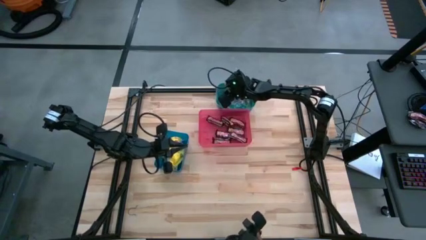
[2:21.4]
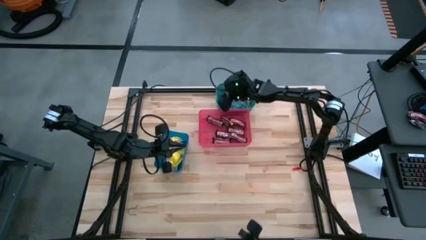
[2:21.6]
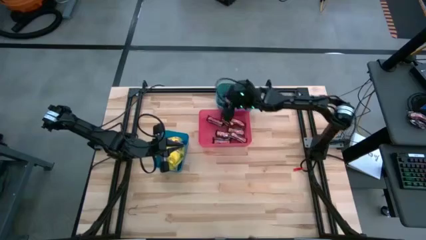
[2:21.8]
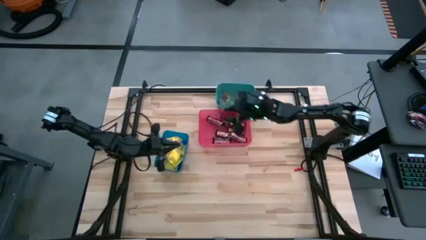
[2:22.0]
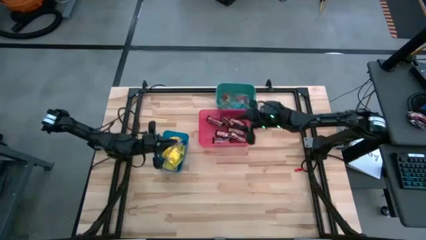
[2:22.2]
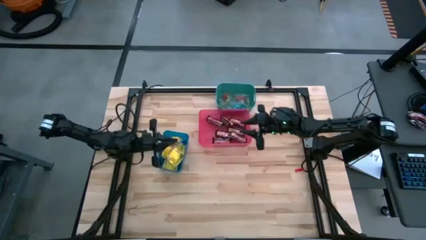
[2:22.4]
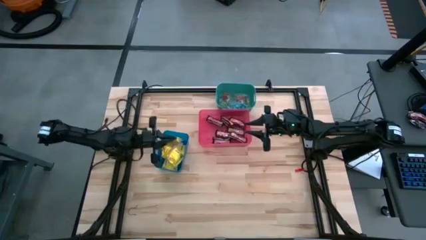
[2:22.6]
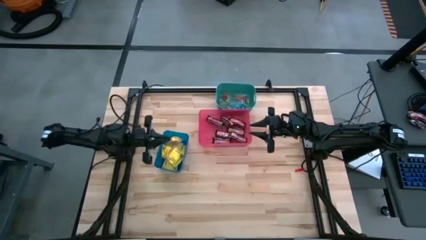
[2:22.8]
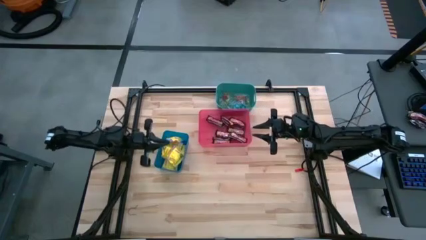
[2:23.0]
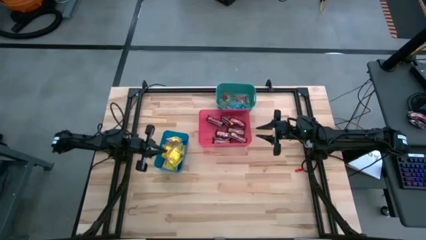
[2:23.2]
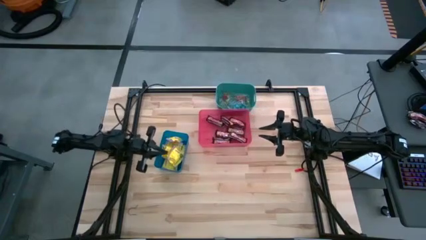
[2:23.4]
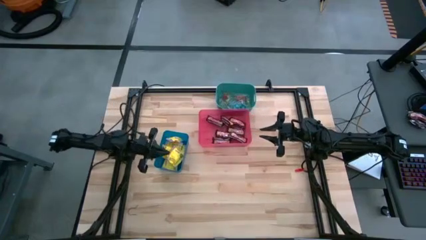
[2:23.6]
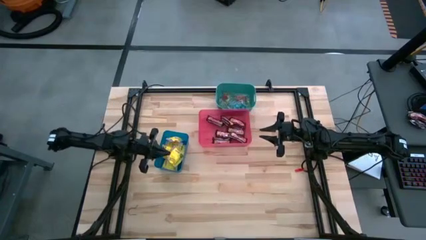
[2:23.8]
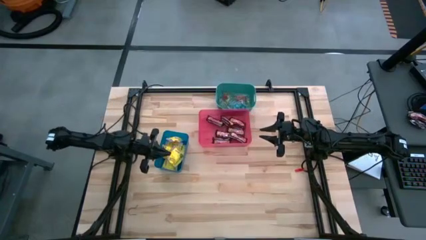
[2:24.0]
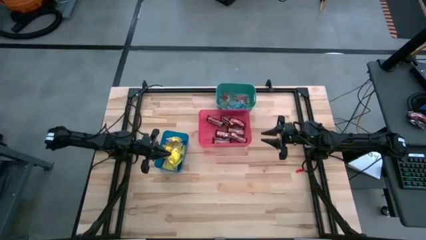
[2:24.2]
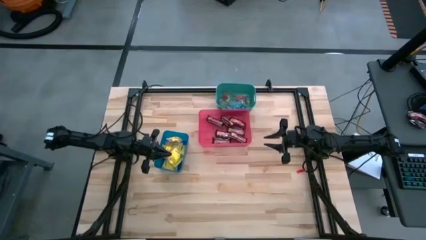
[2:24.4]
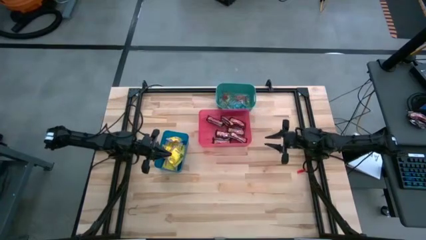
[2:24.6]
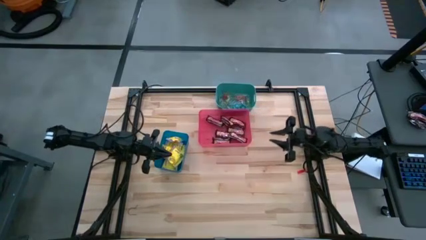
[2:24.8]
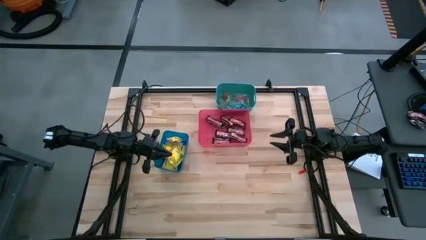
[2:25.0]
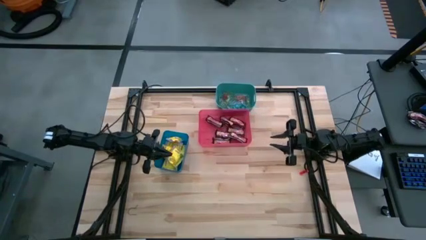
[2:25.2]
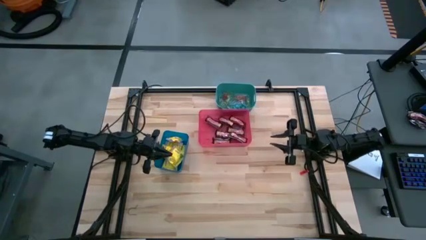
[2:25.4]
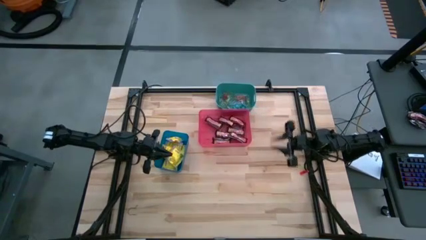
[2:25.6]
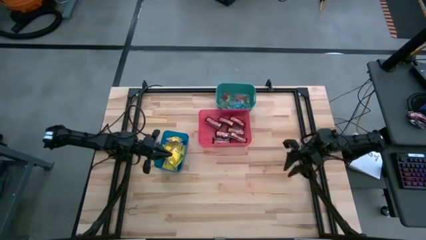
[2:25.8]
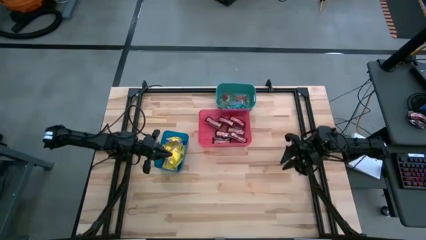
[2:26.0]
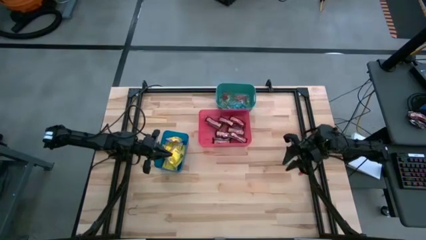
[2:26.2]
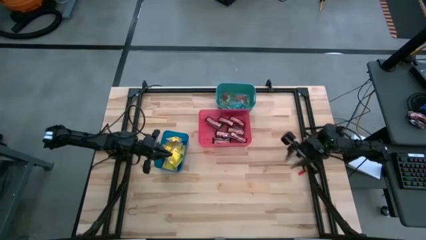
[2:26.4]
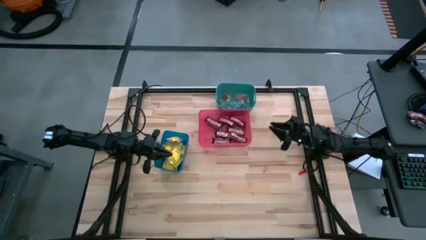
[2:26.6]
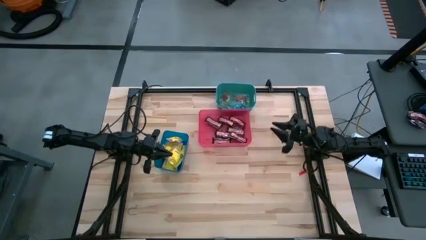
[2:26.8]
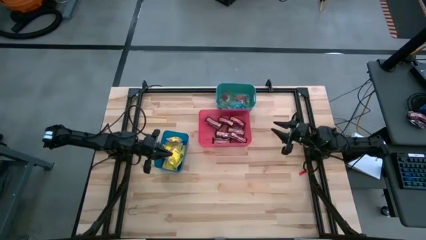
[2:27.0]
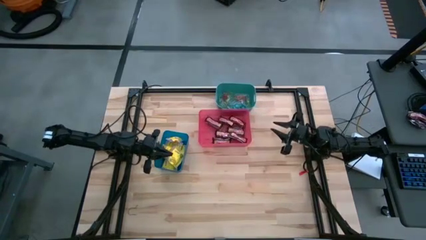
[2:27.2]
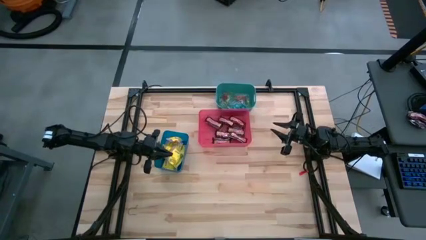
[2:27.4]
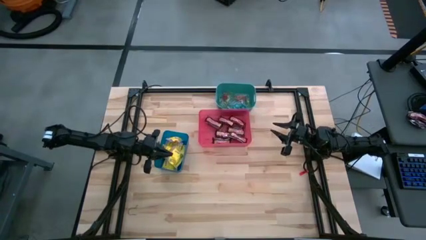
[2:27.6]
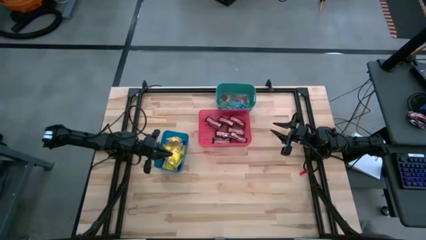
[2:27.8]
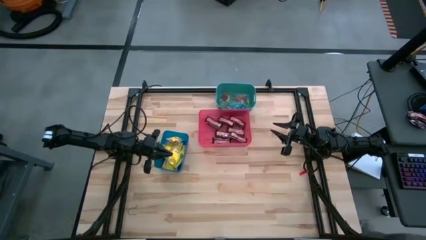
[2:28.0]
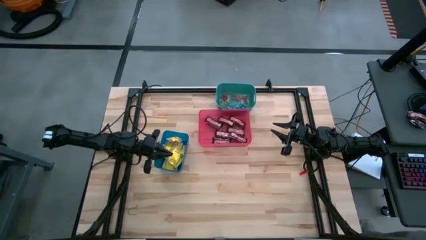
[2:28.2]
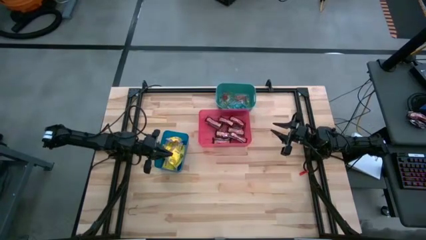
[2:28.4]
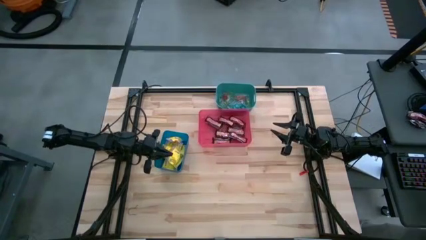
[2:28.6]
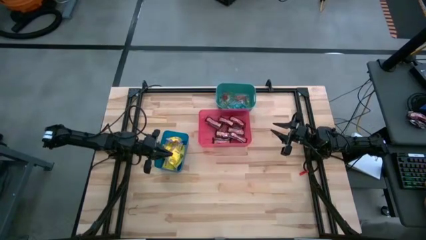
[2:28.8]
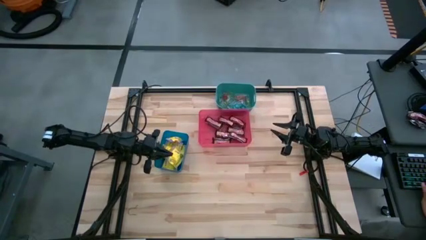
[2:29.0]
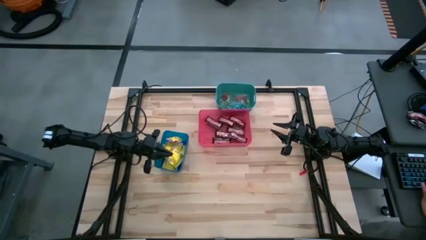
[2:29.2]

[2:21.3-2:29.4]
Task: Sort candy
Return to Home Position

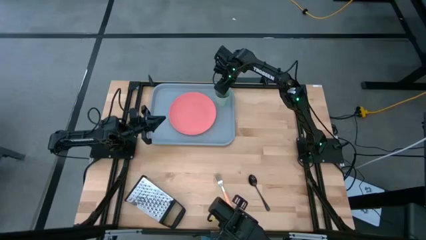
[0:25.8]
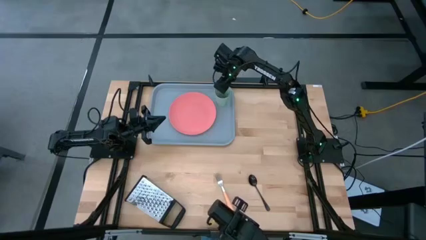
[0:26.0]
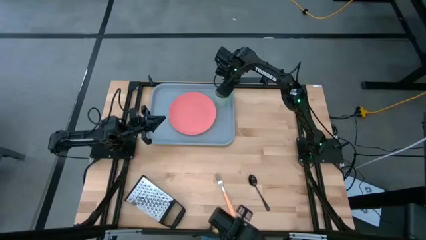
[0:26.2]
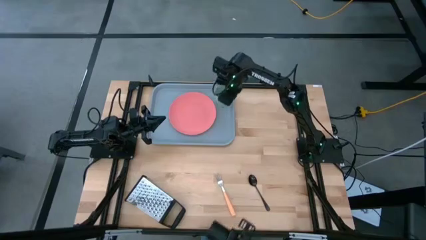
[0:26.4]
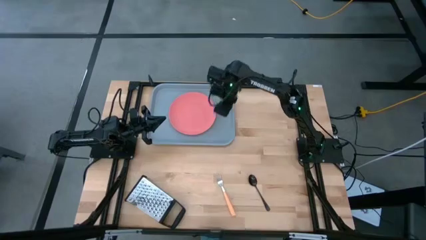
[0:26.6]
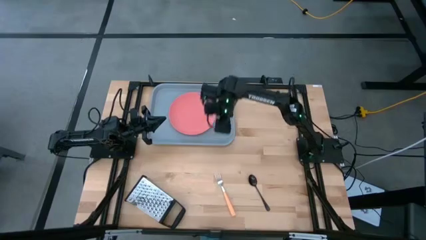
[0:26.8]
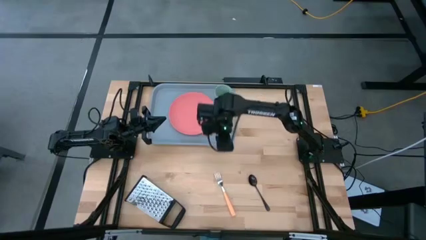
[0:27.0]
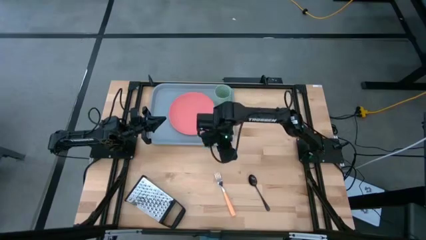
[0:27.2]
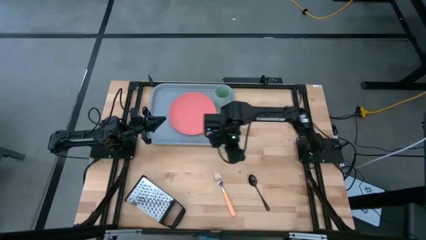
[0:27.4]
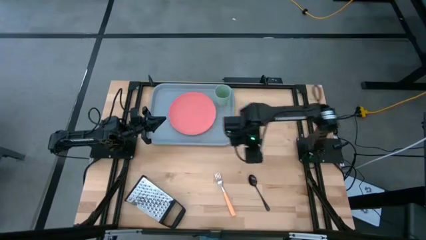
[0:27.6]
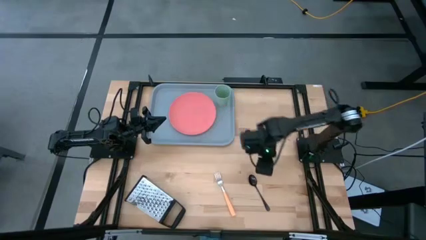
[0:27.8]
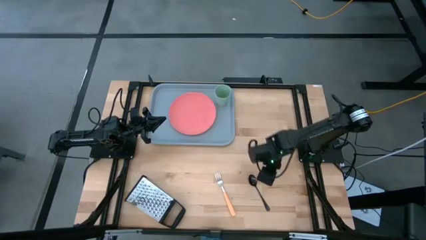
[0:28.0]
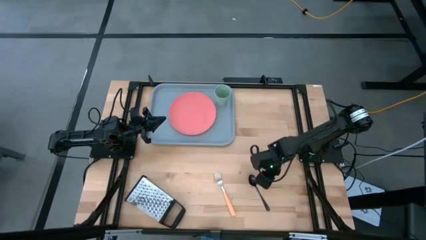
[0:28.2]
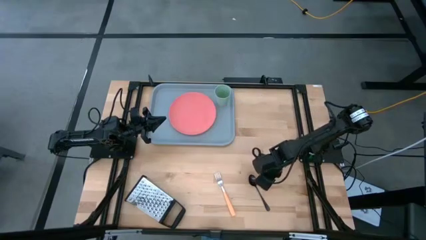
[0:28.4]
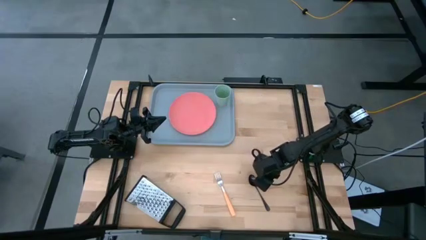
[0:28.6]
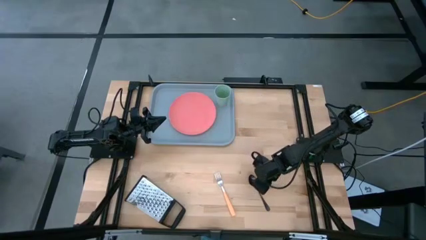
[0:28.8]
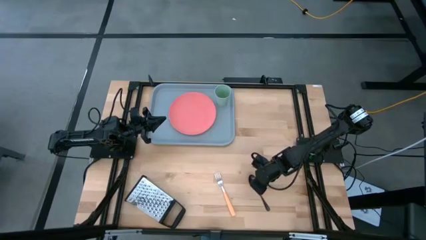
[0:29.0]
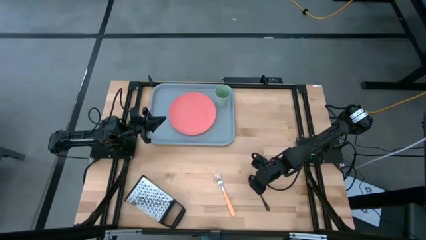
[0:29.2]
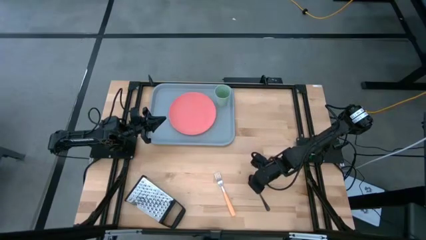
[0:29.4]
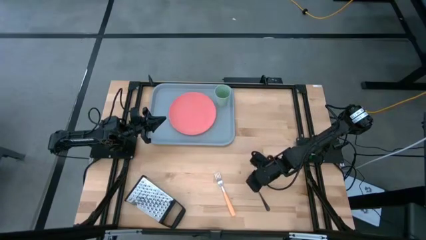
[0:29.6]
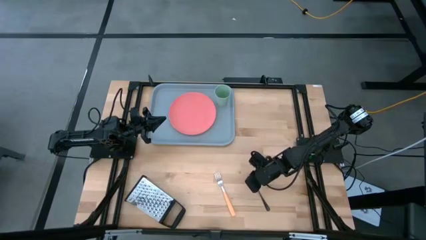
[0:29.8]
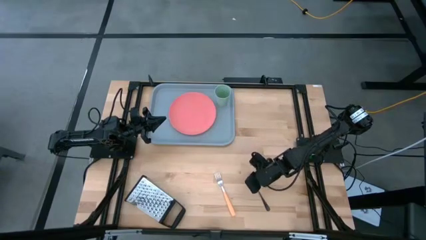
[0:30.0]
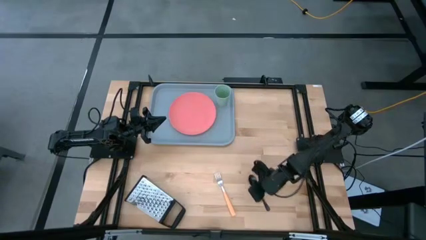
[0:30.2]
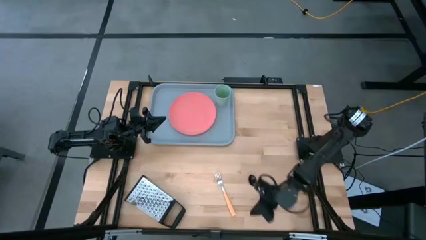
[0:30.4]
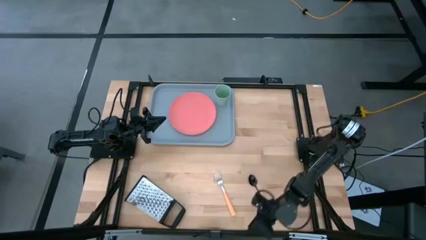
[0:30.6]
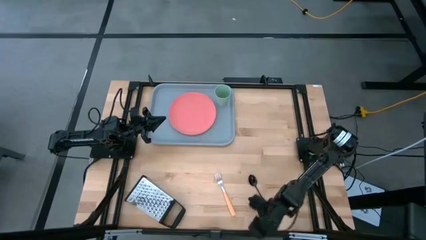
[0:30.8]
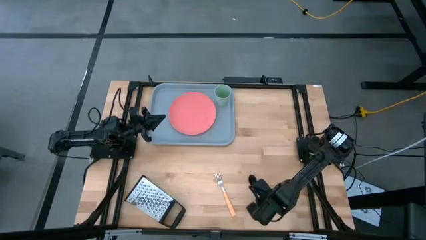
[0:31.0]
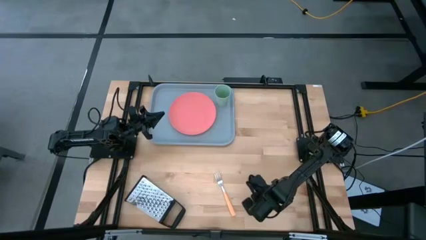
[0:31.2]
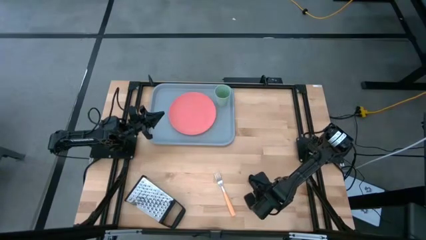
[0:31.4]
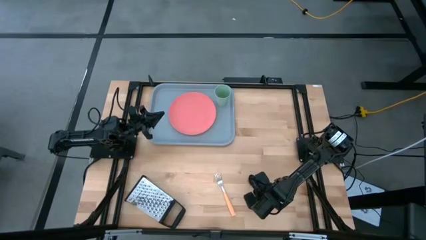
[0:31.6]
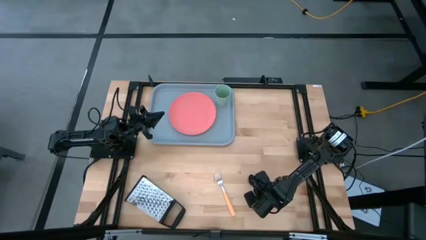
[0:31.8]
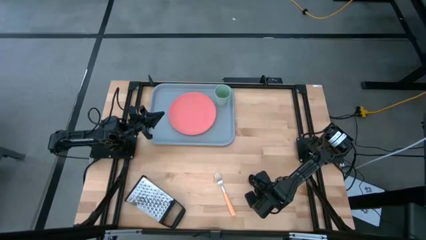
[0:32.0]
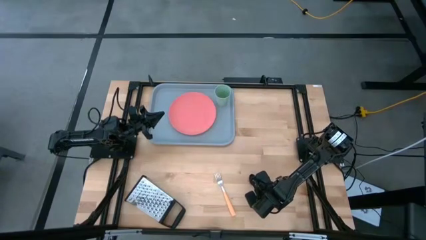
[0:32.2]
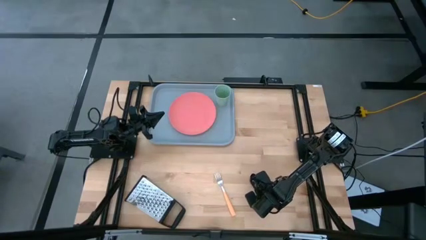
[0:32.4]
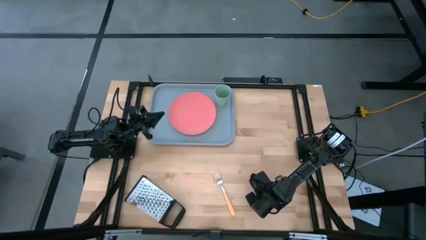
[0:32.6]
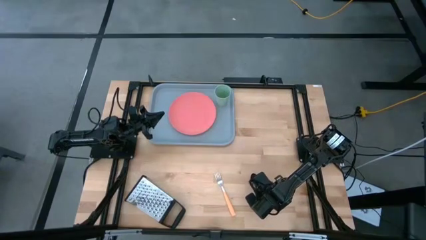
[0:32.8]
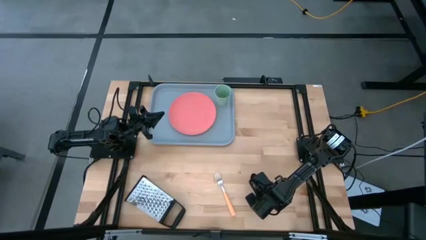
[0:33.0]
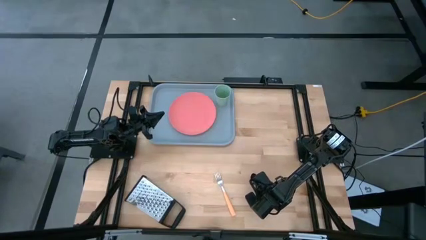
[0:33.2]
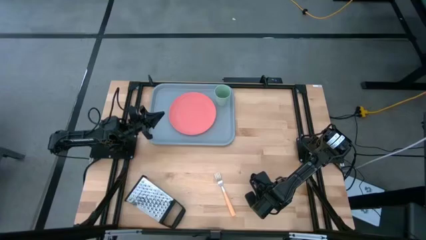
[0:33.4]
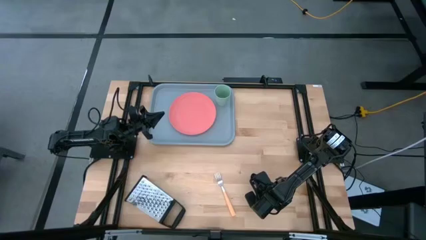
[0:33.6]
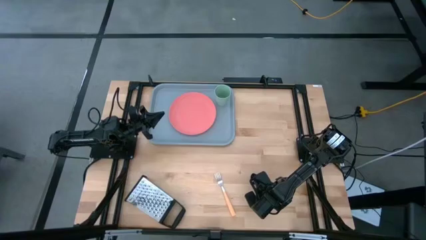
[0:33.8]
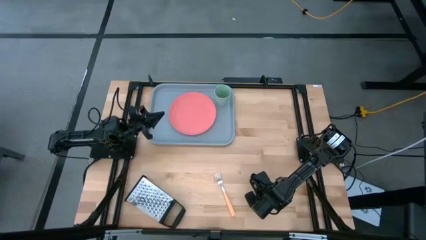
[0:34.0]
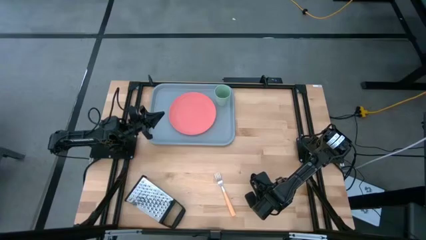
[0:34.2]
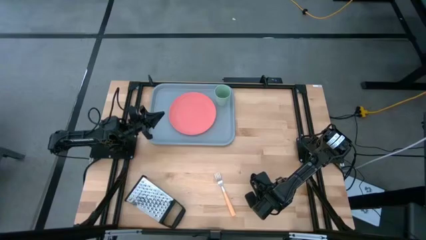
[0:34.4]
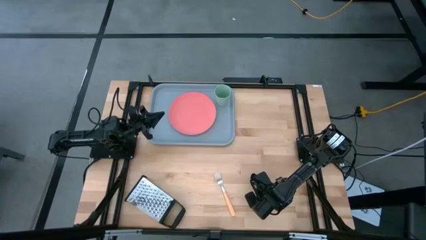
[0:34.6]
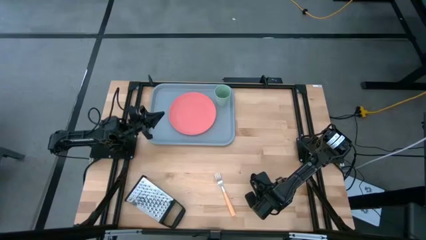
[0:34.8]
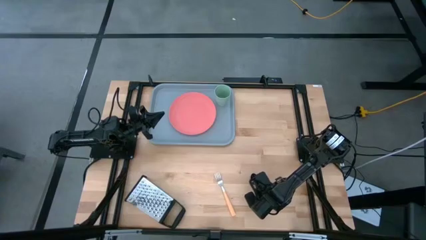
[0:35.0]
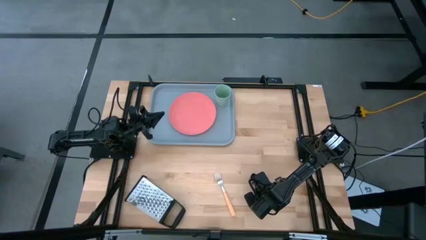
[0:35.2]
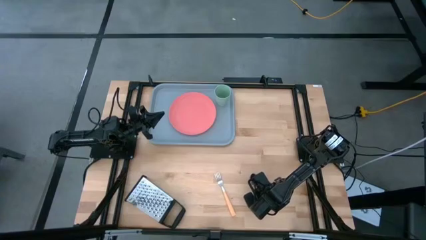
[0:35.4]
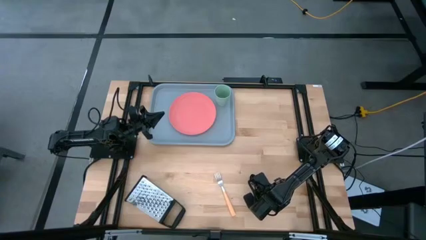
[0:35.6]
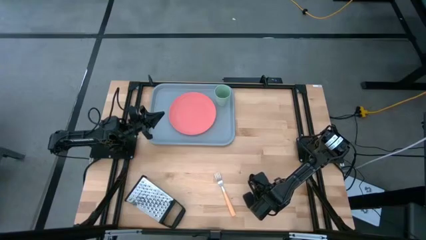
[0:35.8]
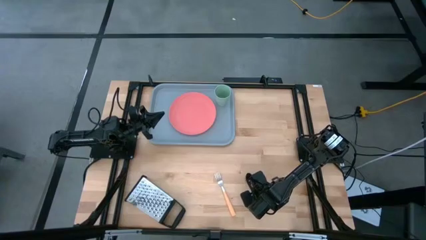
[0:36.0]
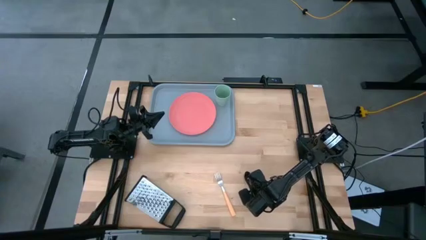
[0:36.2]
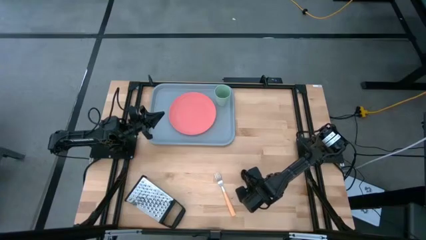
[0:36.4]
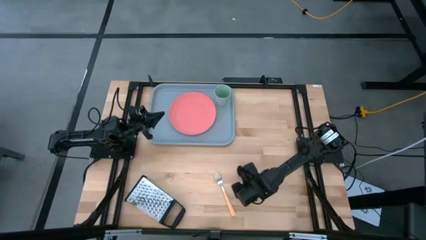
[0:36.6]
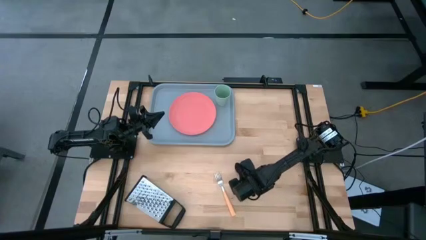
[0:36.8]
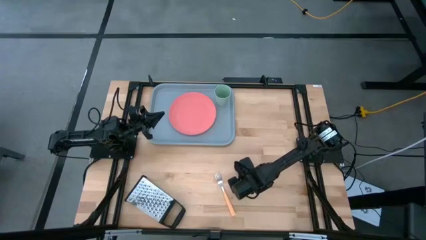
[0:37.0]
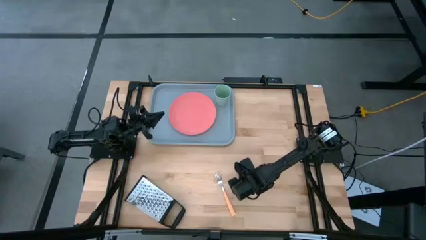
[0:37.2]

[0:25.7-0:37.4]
Task: Pick and place plate/cup/fork/spoon on tray
Put the black spoon on the gray serving tray beside the pink plate
